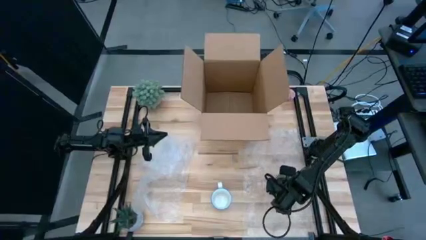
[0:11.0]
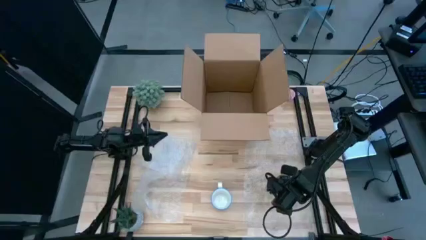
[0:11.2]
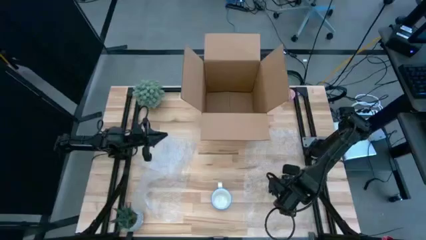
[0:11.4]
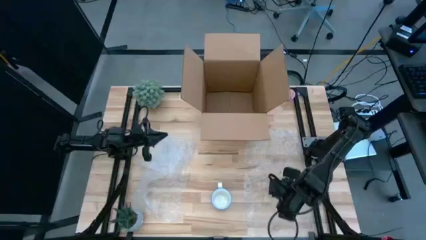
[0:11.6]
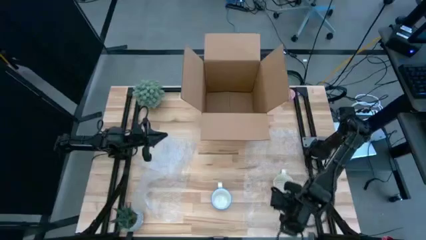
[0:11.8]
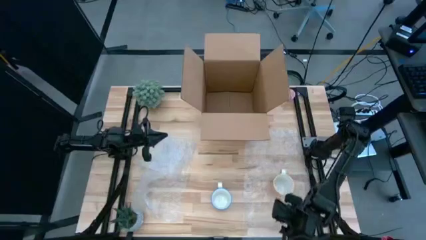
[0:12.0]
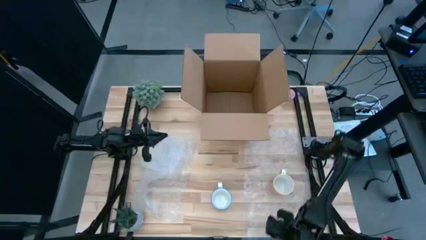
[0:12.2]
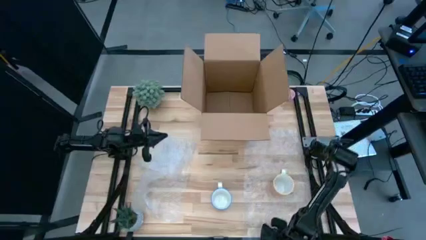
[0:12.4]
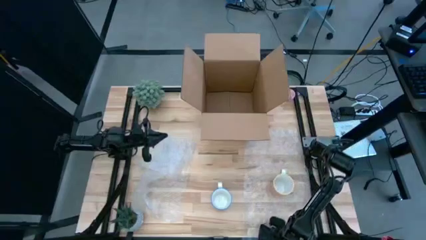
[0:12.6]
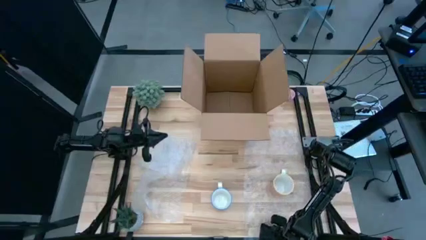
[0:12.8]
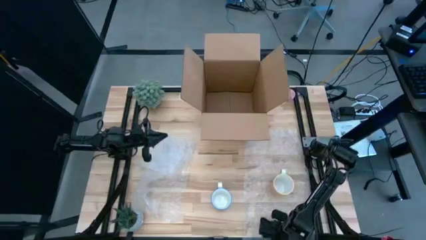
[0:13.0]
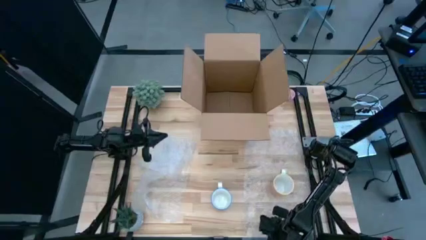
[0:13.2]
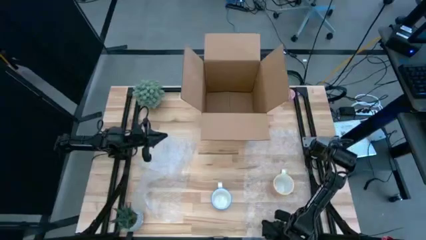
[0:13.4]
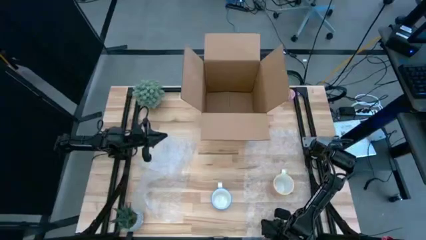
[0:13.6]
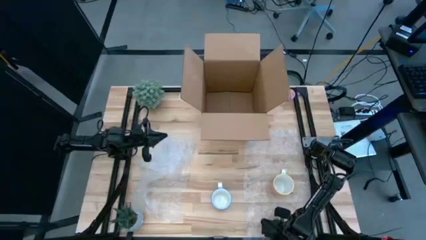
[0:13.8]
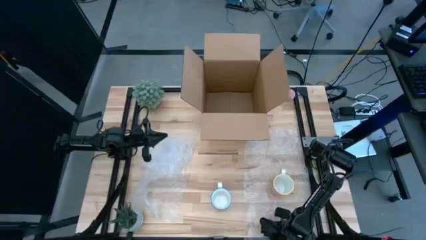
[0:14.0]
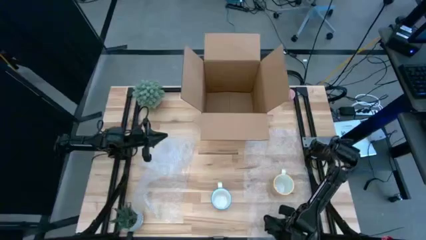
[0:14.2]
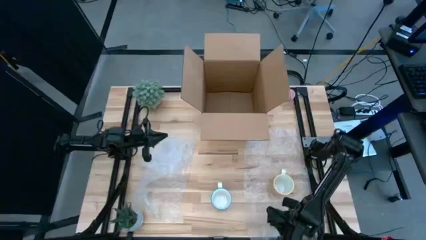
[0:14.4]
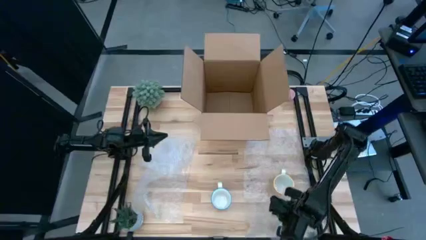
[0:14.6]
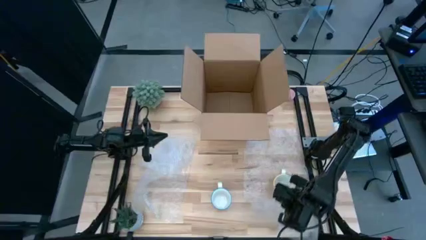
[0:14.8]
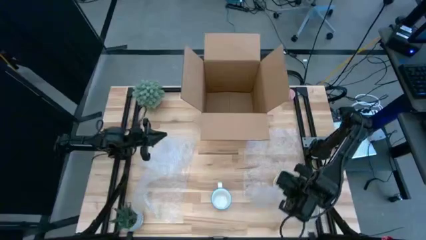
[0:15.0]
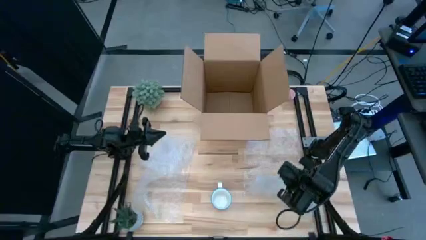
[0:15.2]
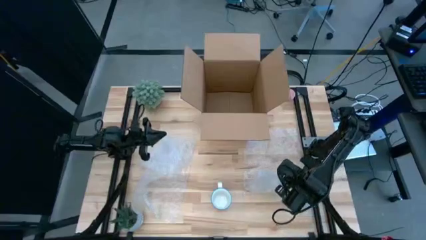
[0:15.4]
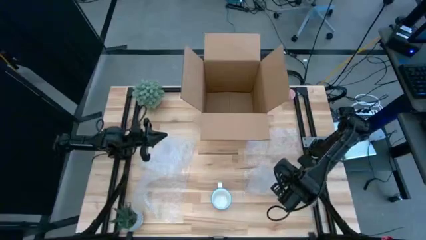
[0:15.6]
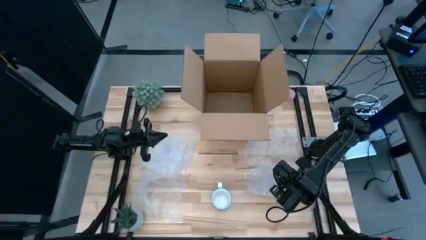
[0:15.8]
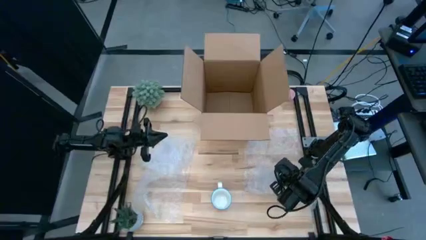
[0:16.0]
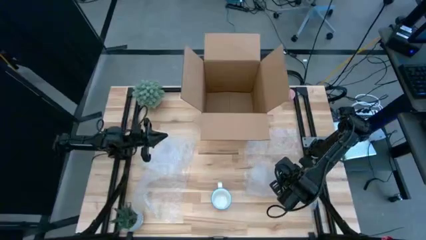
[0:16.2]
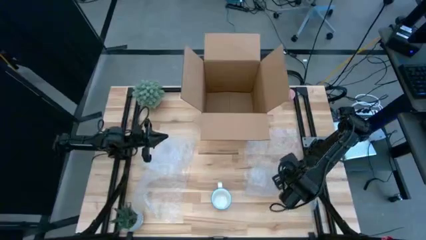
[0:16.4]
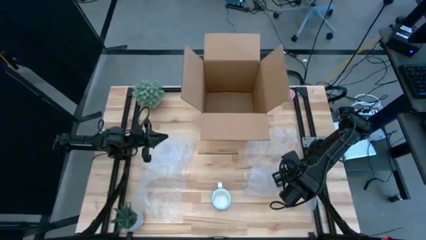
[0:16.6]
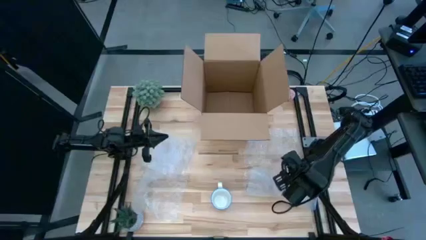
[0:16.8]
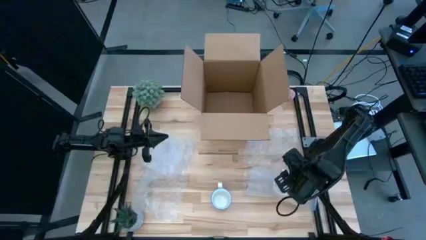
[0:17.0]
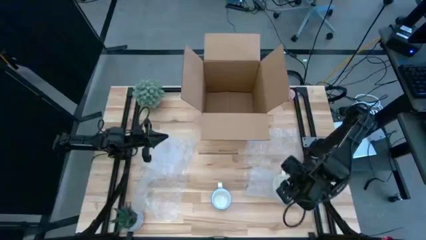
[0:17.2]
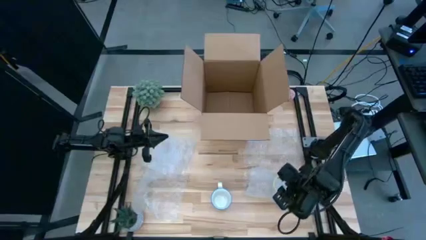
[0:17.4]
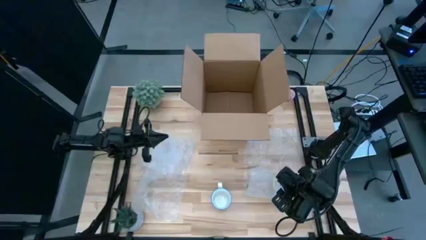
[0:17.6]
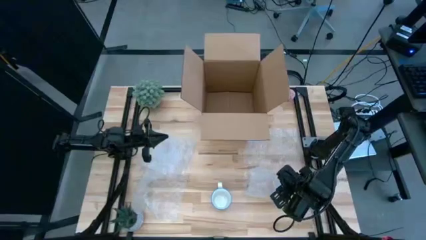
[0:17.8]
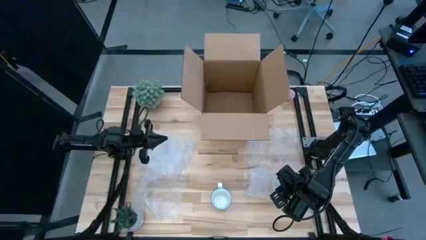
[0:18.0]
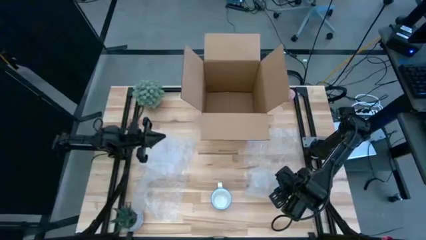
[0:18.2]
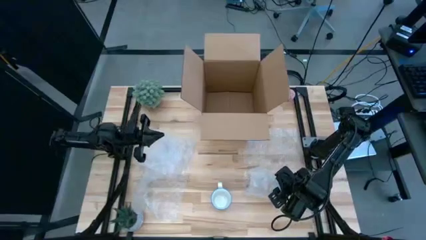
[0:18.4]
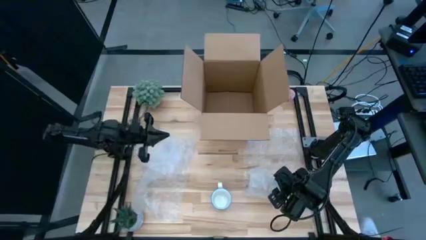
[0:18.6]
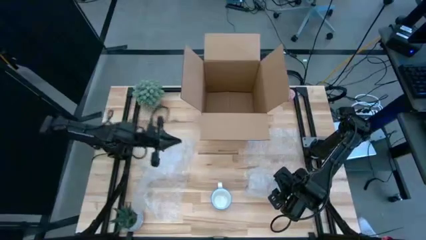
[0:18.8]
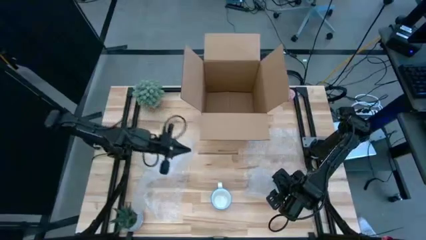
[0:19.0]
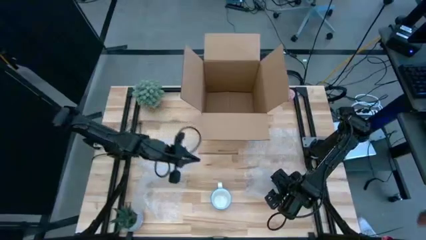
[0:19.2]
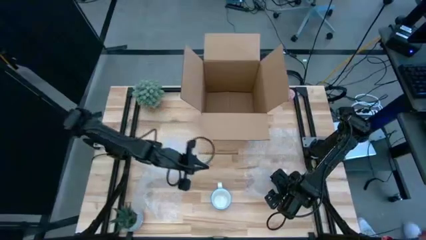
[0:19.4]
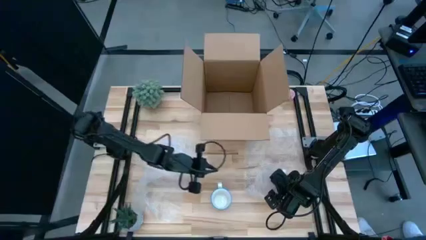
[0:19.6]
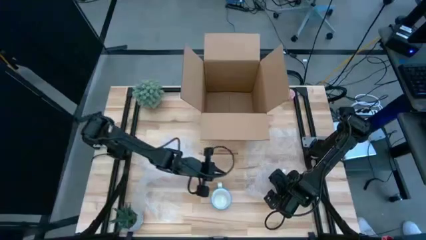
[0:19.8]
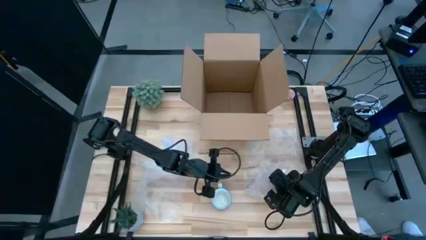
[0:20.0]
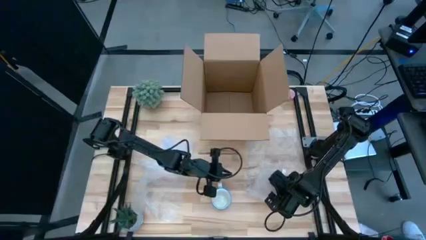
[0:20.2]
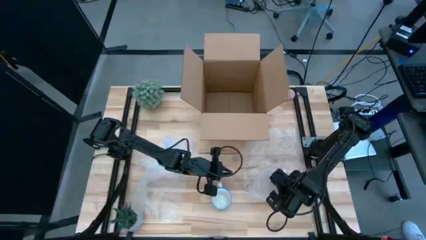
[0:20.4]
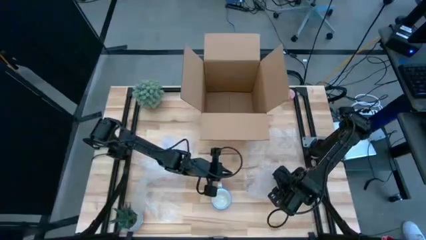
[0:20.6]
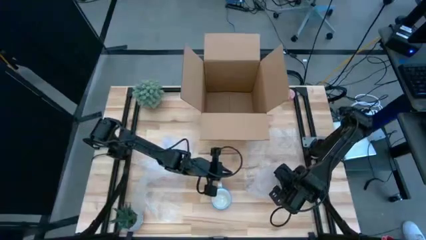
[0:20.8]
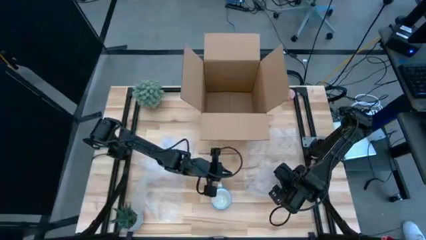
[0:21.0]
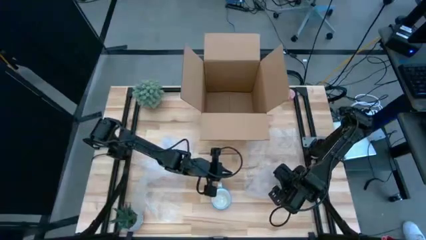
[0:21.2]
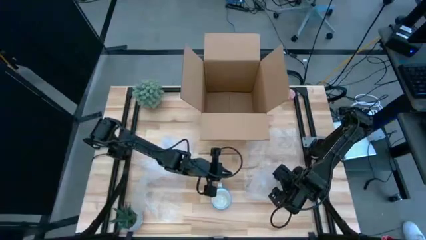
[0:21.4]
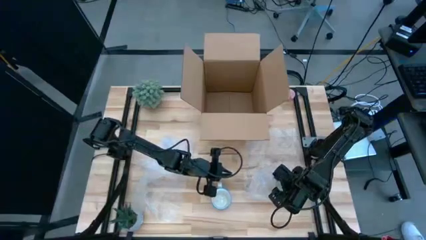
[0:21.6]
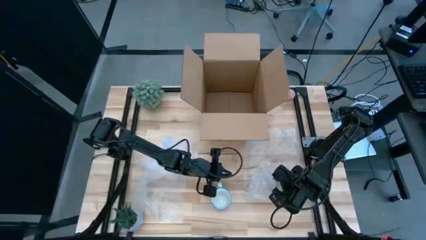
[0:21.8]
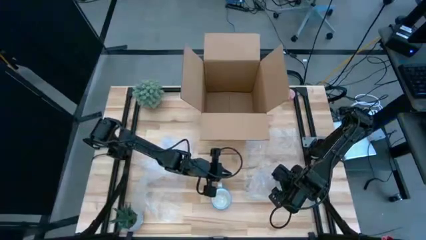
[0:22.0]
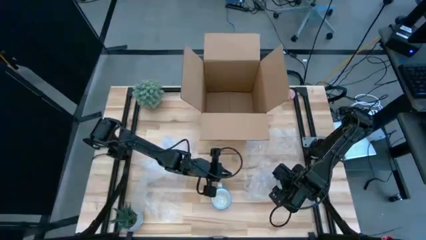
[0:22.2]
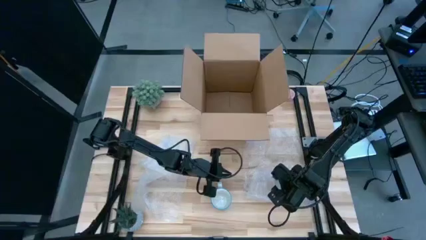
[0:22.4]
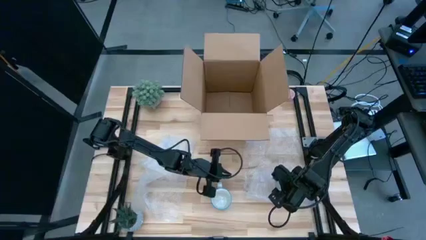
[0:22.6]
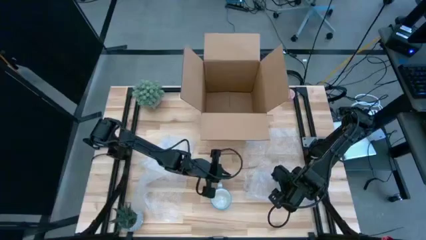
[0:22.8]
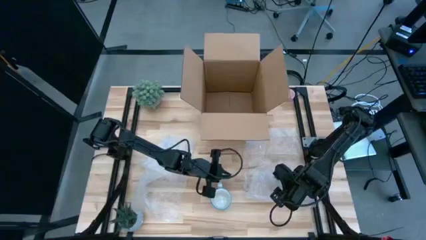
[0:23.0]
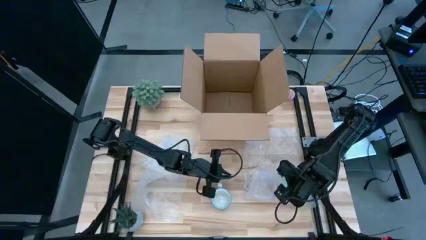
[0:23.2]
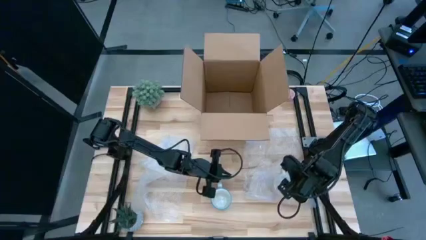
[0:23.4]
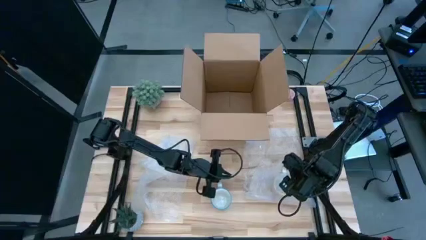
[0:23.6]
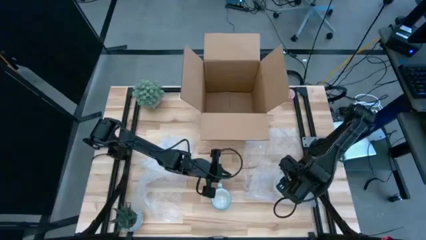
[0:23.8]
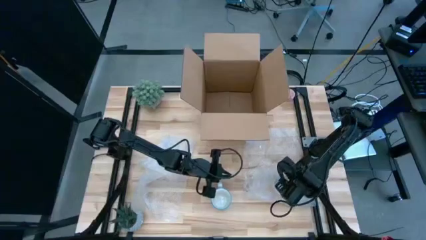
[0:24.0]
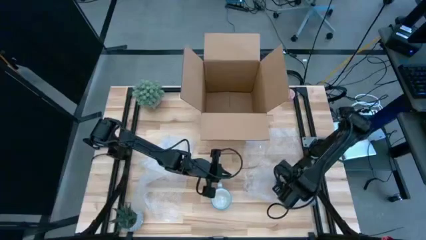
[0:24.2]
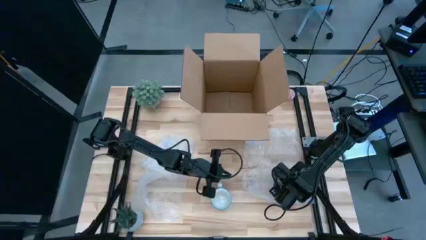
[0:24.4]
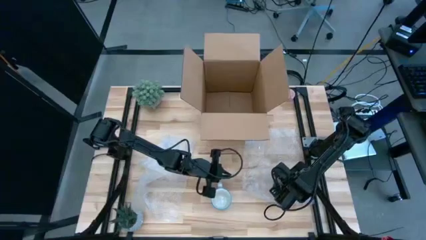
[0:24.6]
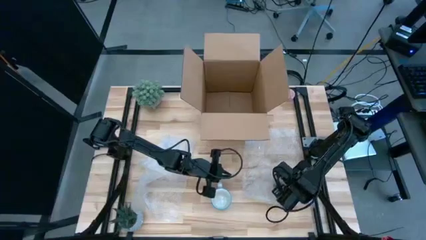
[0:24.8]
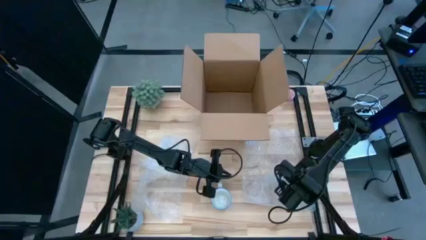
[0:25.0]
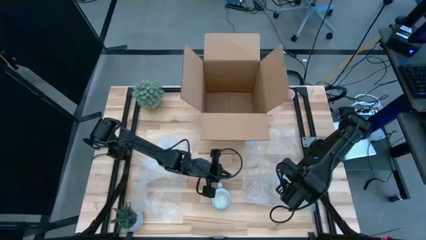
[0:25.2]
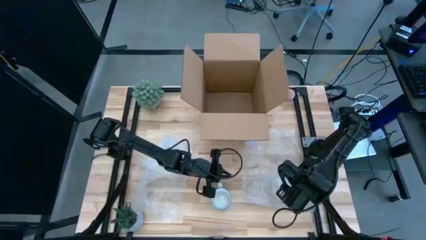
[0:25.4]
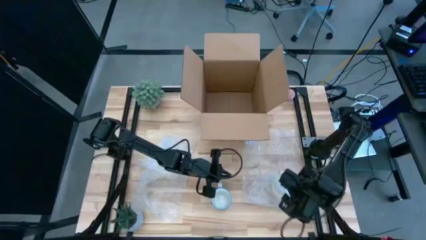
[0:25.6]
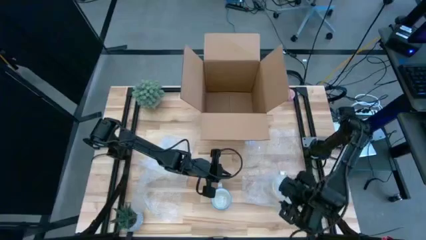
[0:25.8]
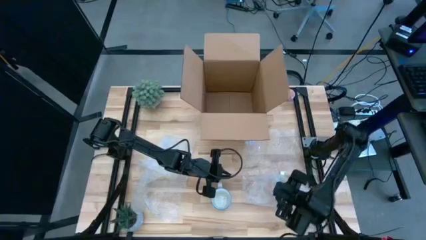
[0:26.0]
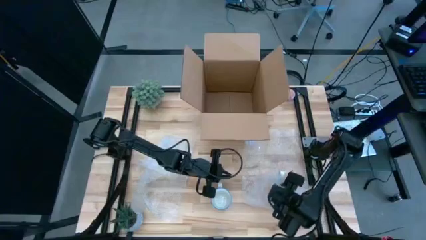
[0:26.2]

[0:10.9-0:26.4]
Task: wrap mug
Wrap the yellow mug with the bubble wrap
